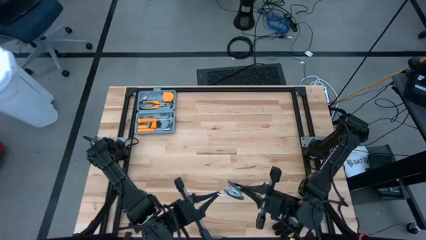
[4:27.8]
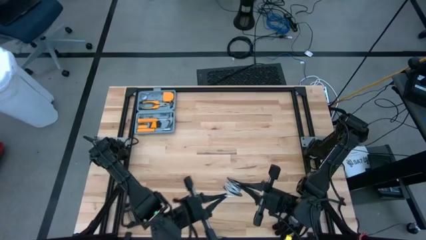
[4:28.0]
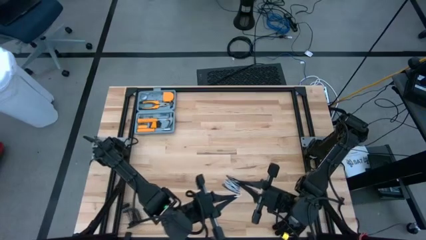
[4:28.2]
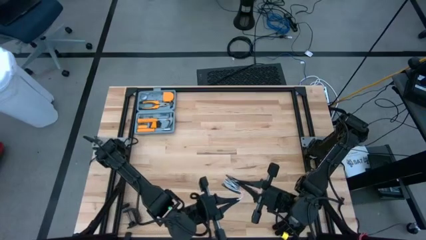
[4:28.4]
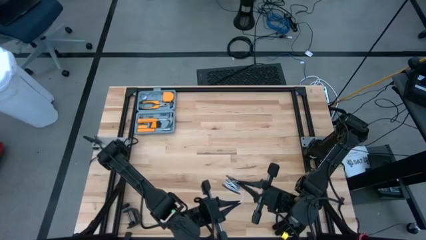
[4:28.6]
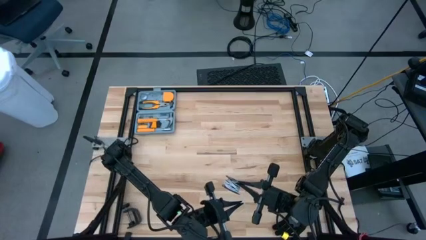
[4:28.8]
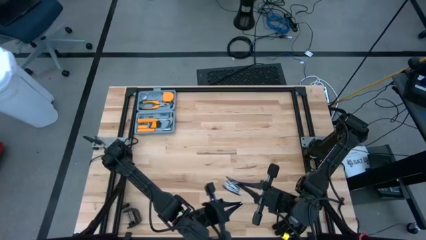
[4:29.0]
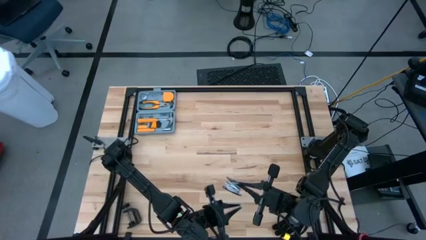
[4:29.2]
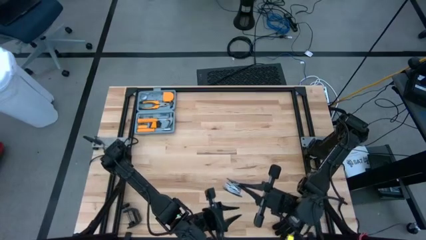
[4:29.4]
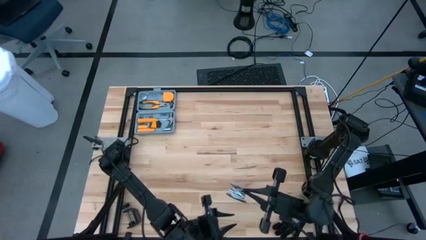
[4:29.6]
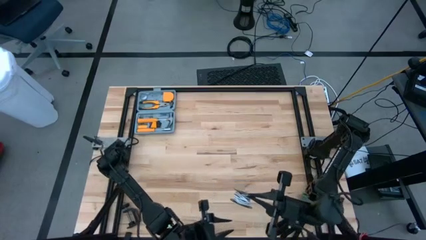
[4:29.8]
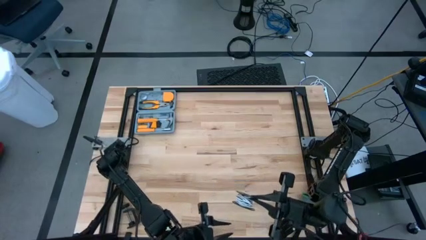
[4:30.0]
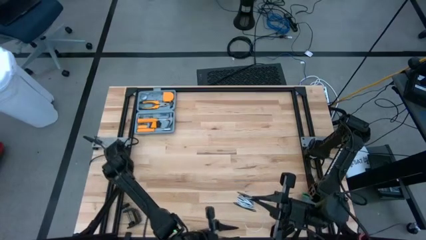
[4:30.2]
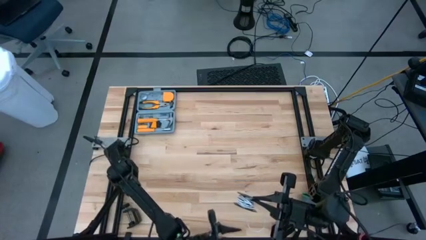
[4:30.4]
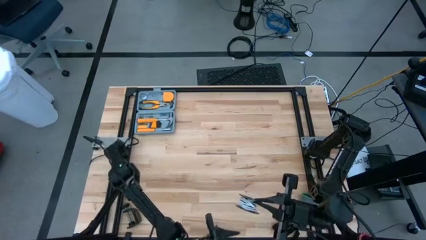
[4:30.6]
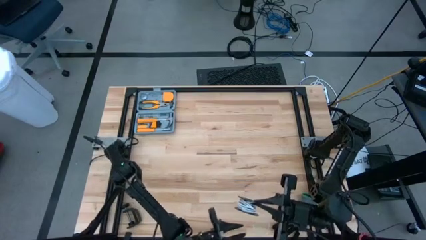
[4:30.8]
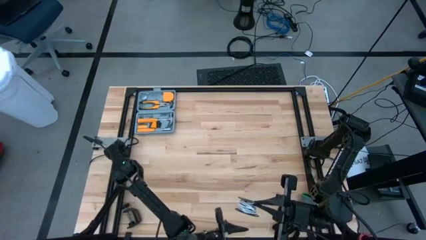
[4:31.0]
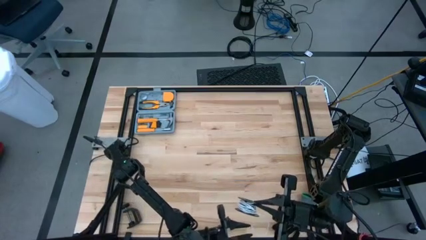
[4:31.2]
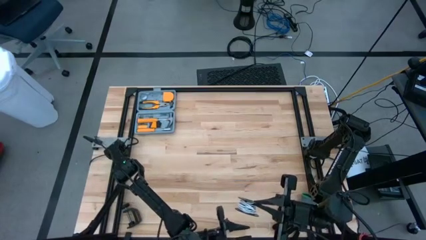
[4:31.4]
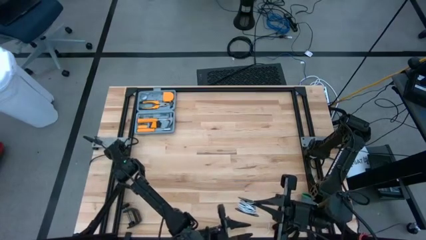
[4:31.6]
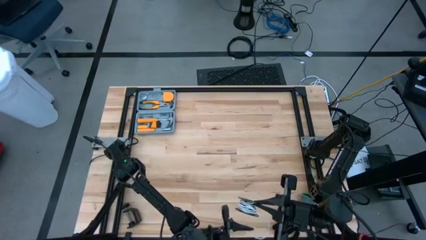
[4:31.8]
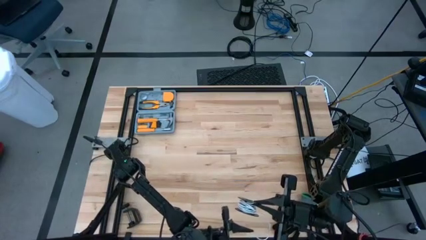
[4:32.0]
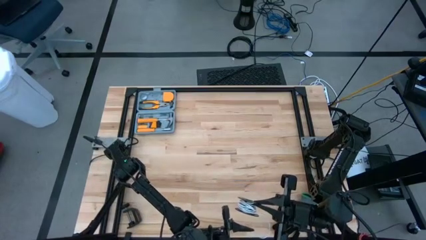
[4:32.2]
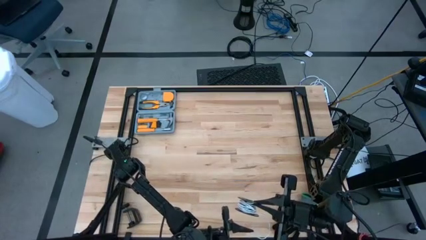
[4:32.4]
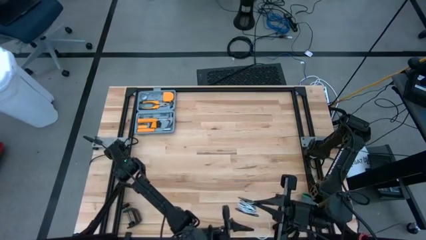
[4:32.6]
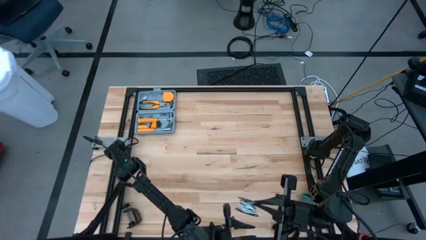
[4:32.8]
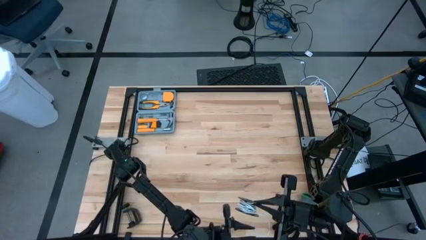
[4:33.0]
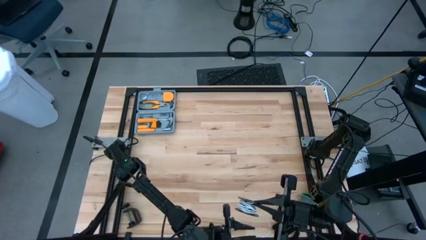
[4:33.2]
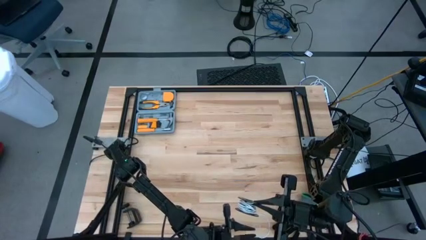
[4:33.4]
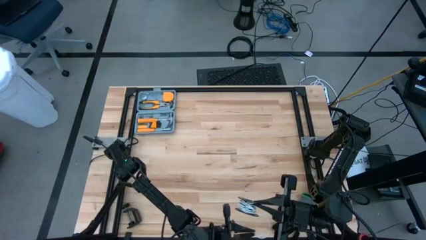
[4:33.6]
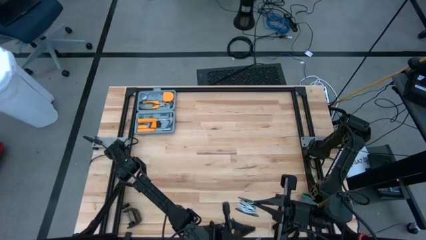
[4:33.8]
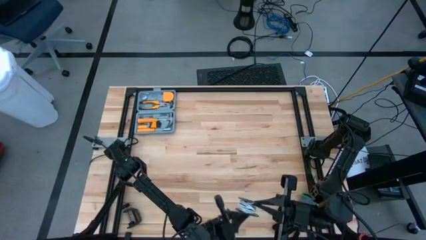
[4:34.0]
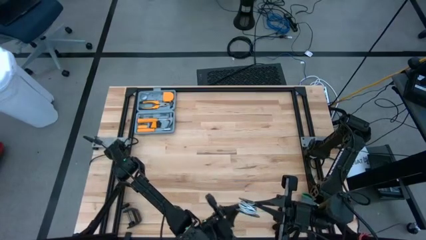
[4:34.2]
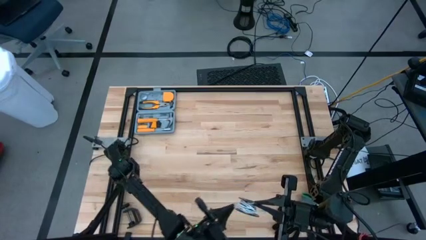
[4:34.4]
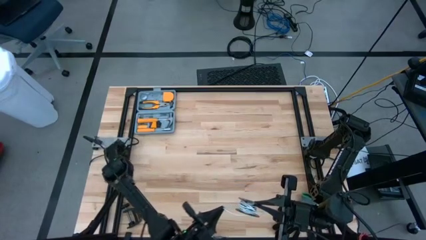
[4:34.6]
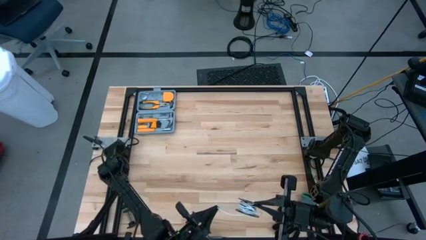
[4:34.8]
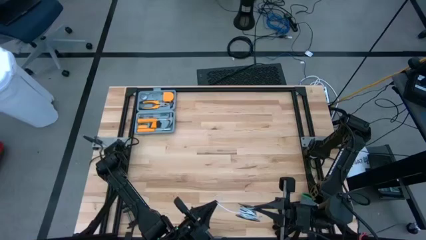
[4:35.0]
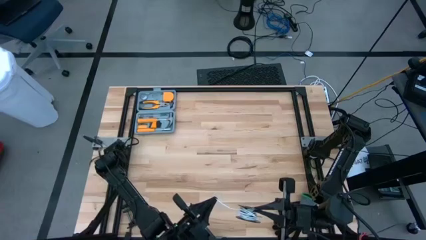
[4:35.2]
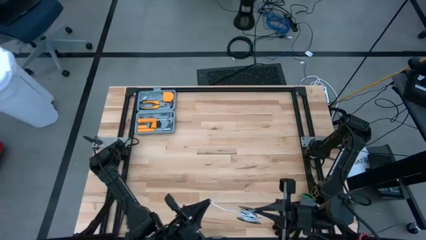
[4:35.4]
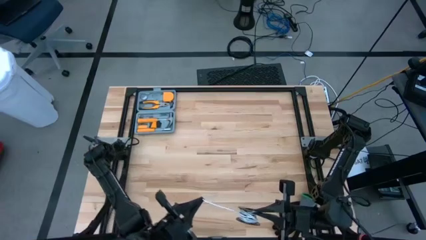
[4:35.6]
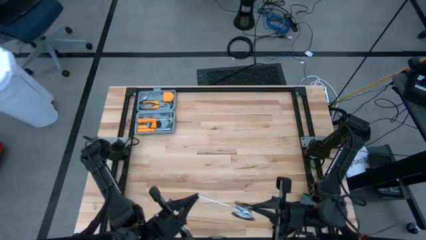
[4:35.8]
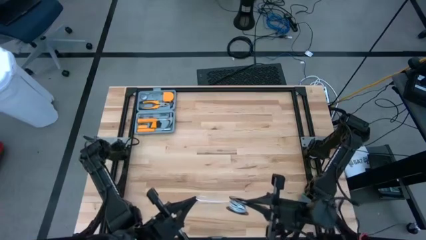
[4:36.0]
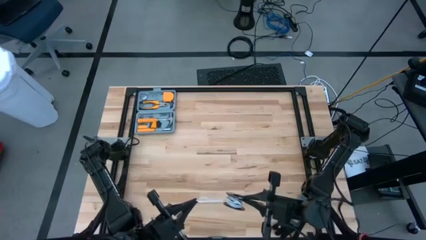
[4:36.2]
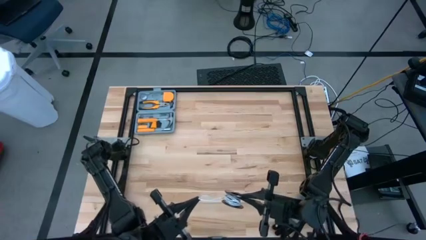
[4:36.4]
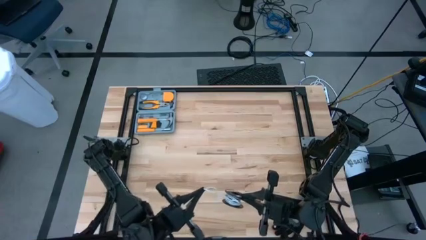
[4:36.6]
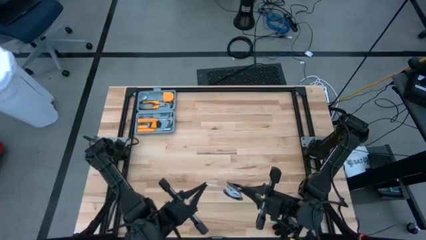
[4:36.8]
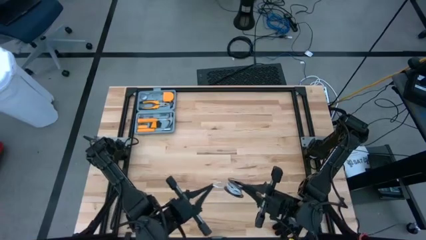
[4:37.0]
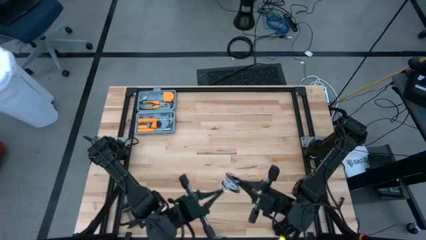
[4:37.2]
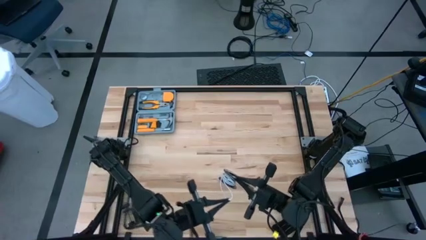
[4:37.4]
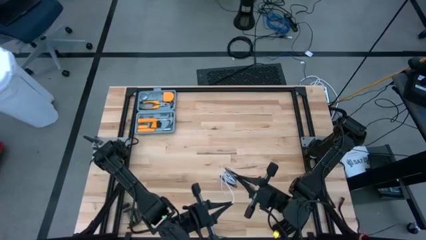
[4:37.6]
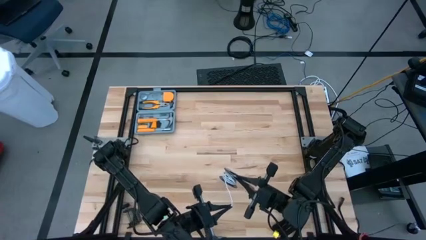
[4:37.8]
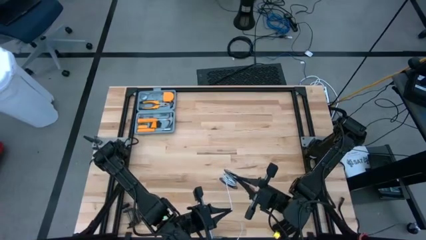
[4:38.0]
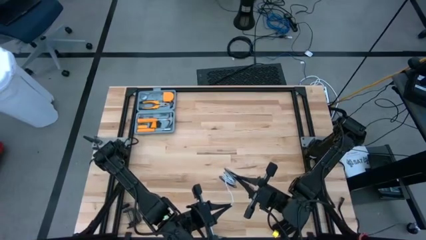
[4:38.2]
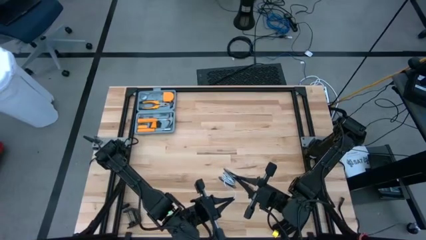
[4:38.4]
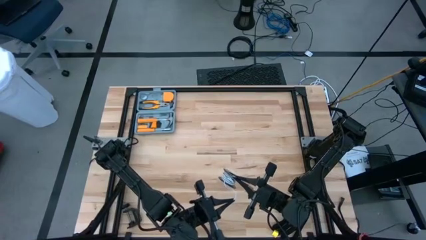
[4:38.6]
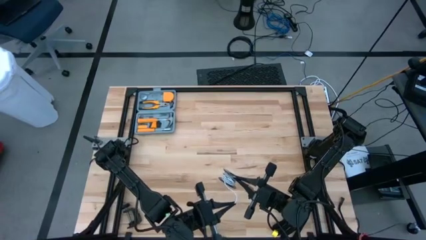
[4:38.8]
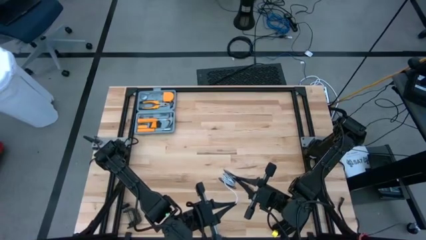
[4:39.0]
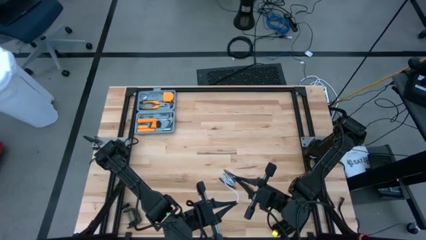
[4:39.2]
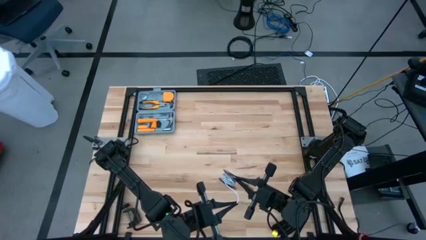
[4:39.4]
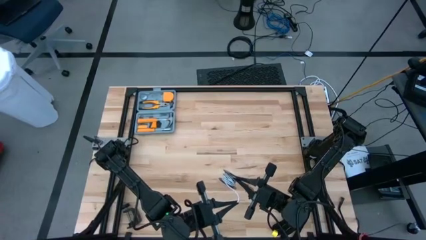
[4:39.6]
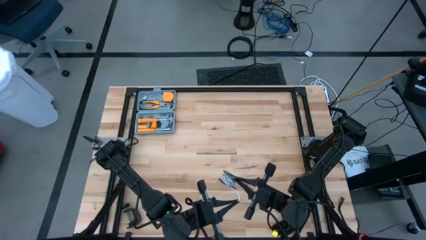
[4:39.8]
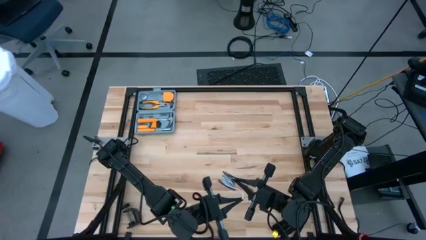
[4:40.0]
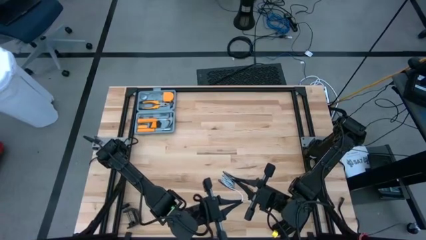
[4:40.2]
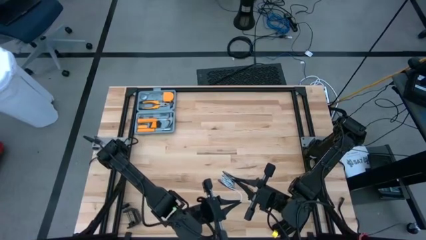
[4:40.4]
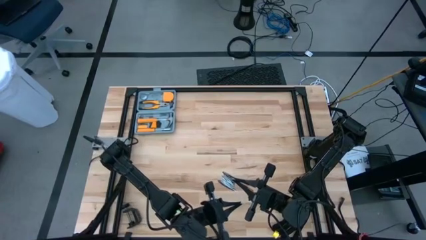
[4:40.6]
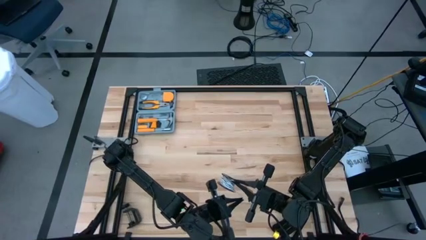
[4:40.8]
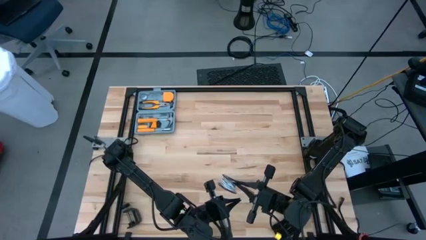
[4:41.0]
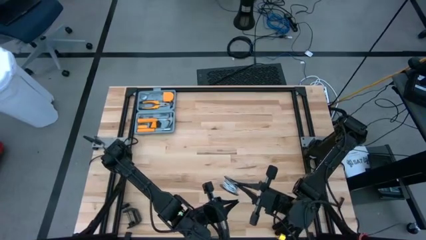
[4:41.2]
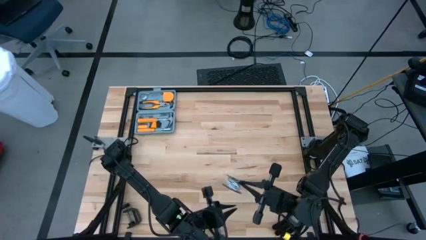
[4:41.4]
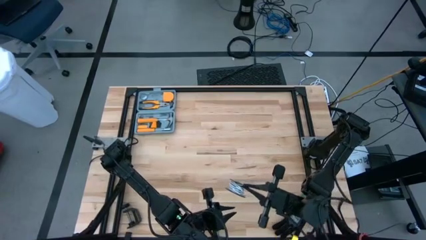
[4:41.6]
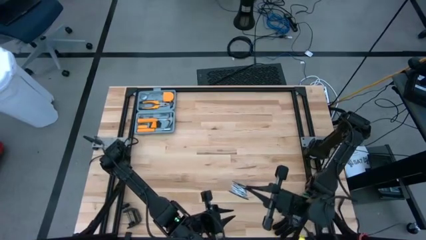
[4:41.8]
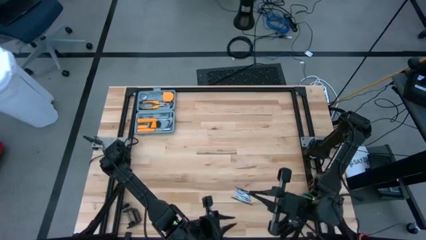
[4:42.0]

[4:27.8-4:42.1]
Task: Coil cords
Coil the white wire on the spool
